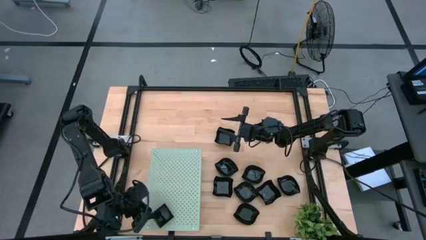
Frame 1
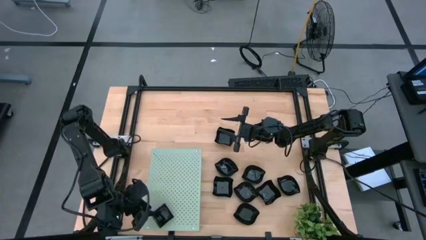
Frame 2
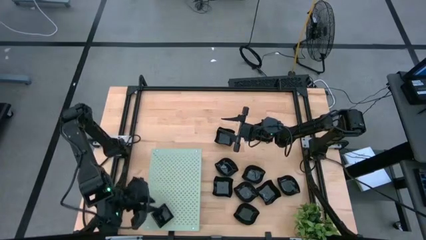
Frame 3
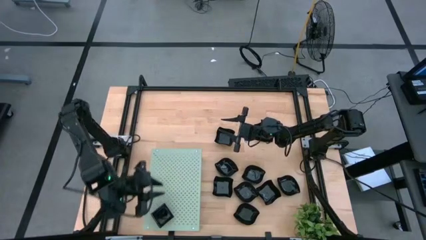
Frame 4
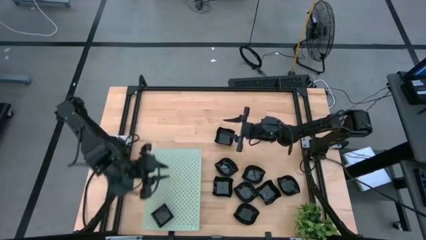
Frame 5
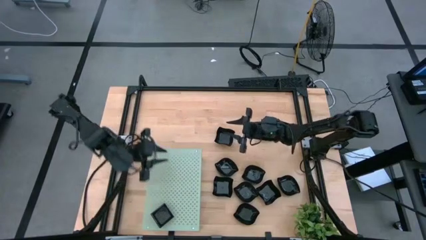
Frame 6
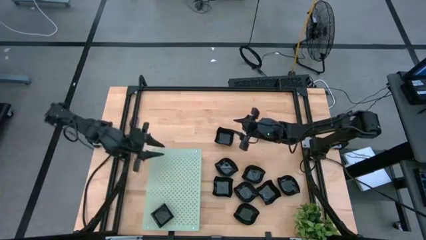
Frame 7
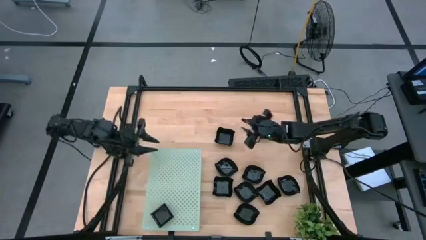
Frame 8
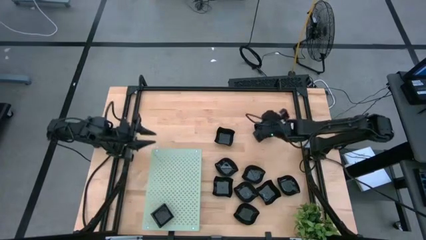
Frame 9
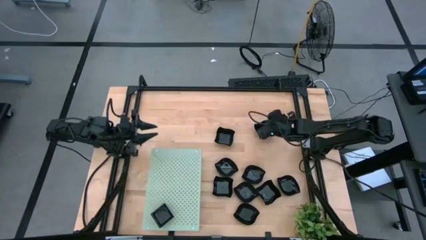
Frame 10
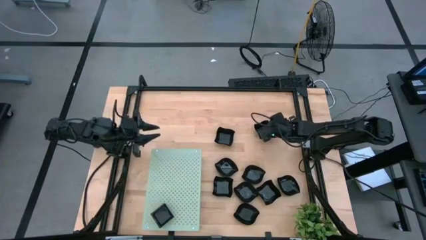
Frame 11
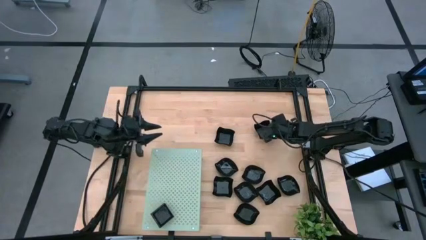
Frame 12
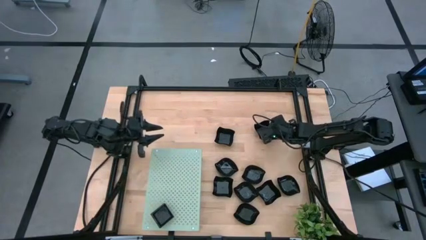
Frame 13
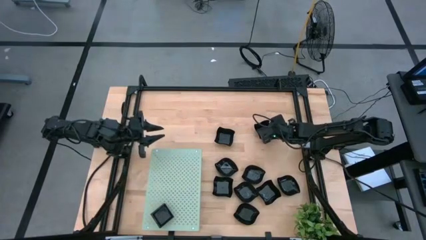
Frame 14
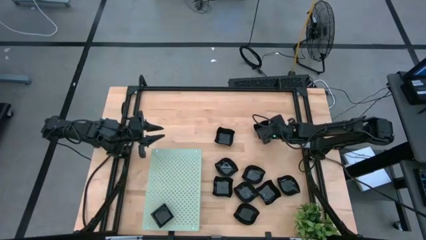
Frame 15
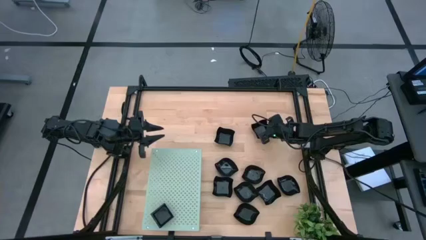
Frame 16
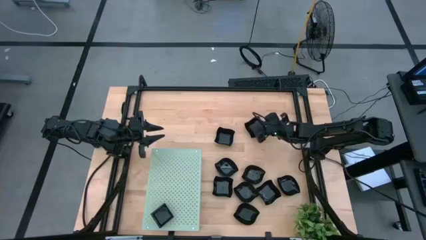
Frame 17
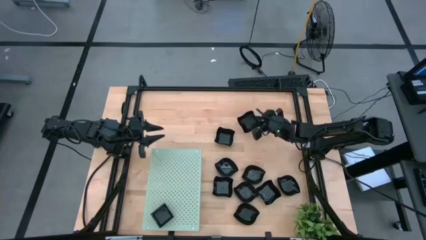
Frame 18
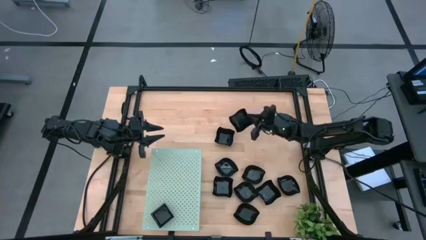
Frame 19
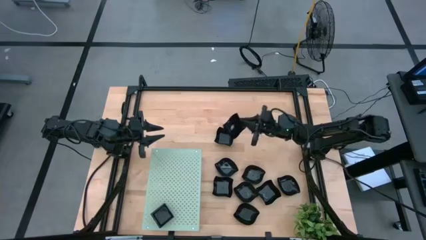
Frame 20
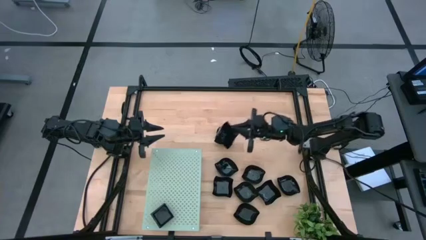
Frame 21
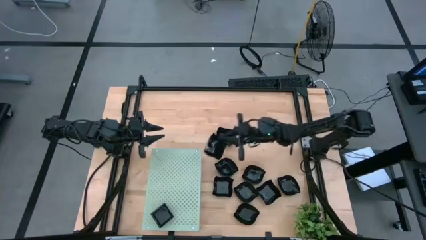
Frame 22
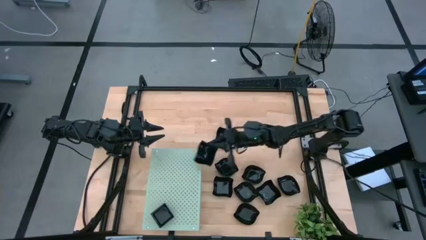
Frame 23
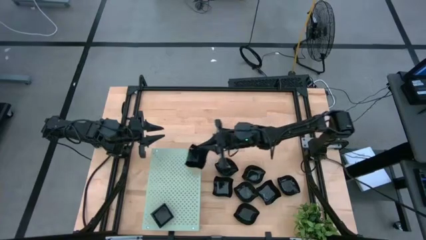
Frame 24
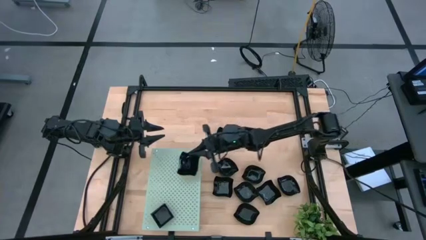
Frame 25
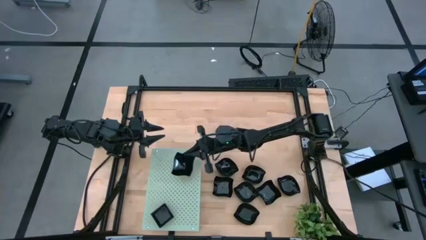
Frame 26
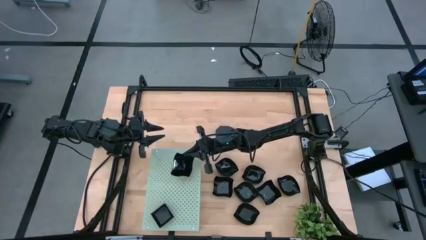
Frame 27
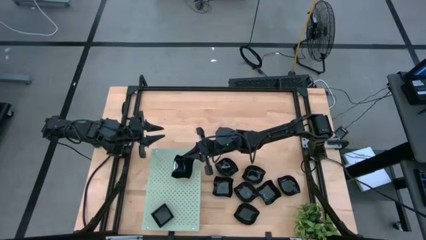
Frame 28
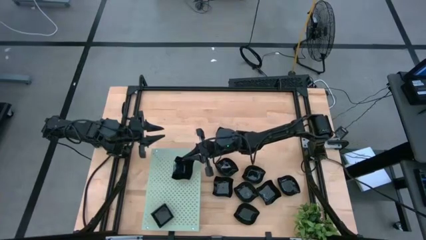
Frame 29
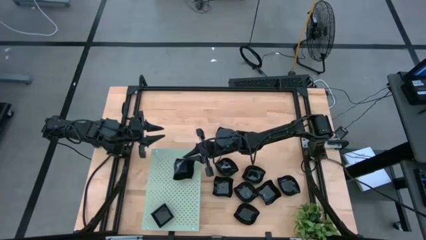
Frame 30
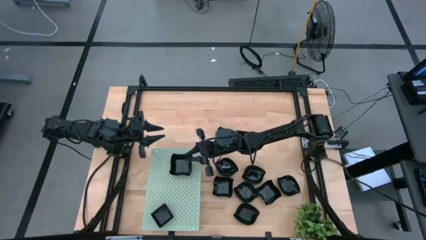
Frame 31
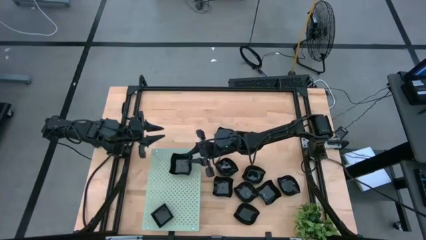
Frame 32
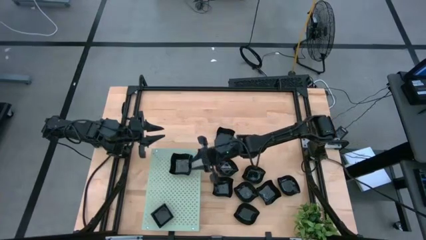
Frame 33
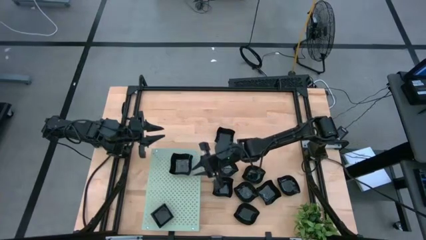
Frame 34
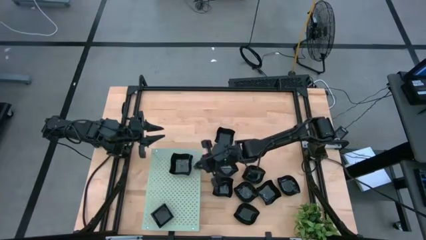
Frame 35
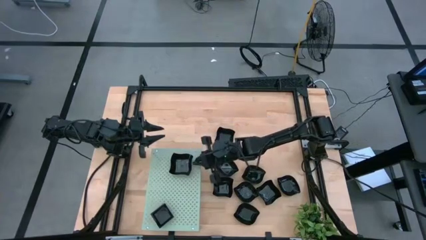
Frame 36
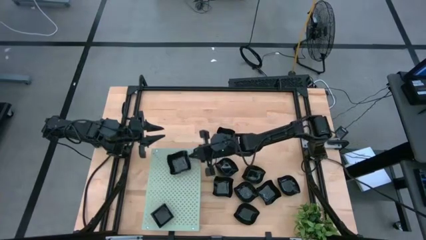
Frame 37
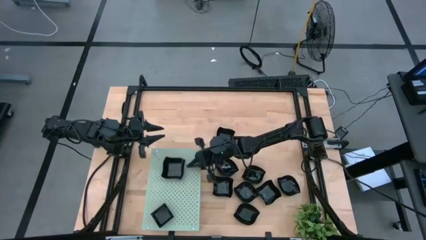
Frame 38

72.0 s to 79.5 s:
Task: Pick & Place Mini shaped plates
Put the distorted square plate on the shelf

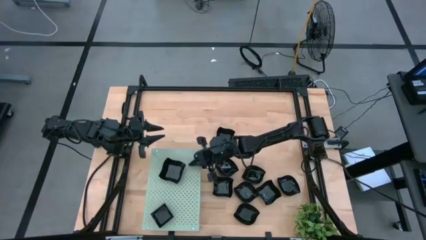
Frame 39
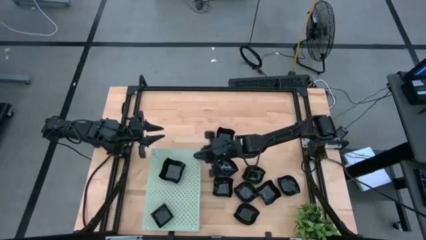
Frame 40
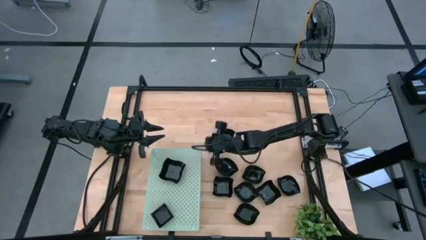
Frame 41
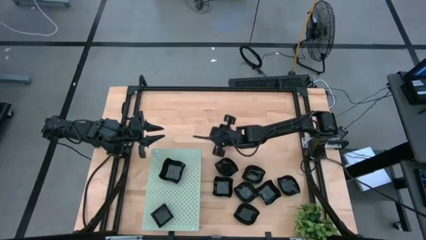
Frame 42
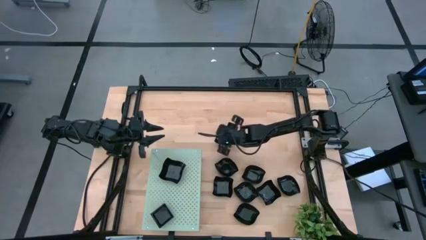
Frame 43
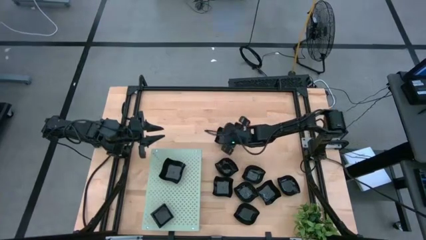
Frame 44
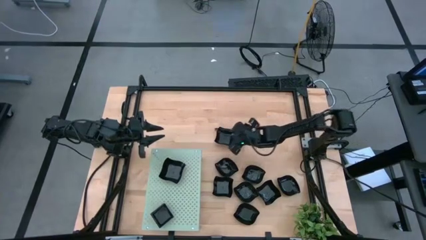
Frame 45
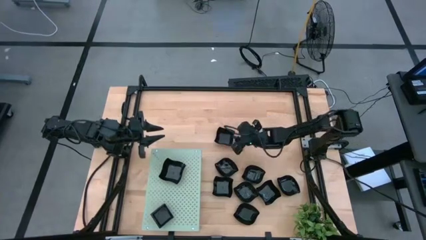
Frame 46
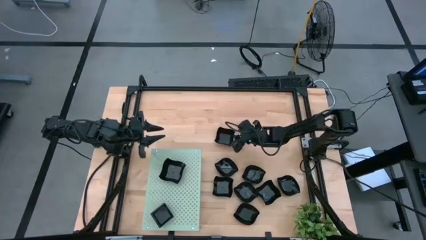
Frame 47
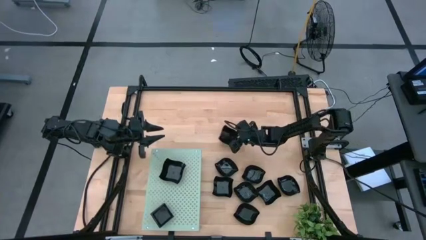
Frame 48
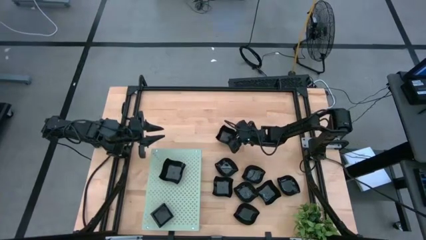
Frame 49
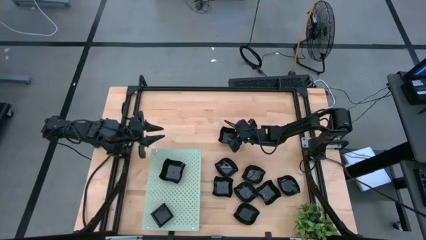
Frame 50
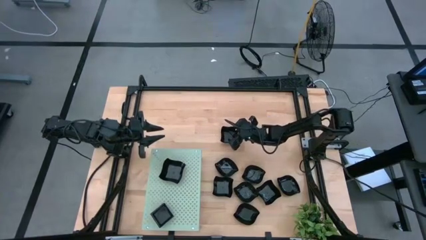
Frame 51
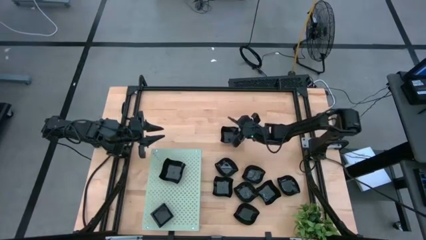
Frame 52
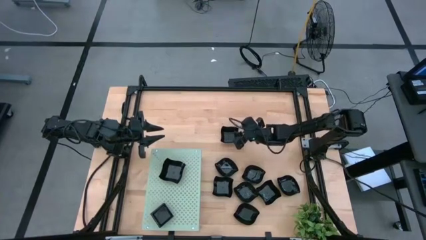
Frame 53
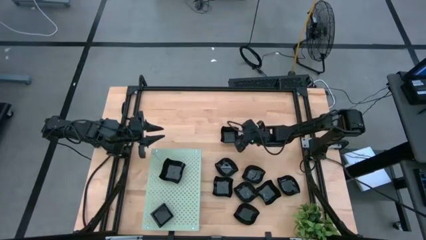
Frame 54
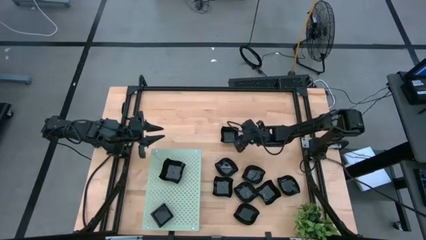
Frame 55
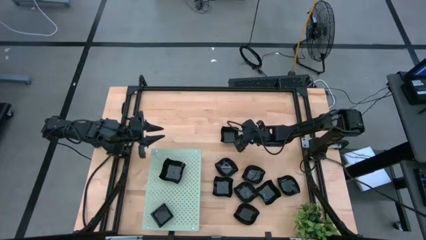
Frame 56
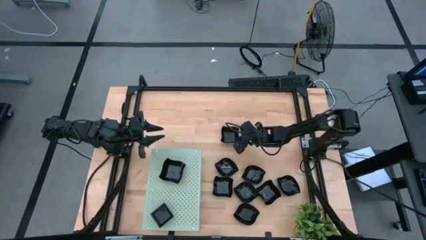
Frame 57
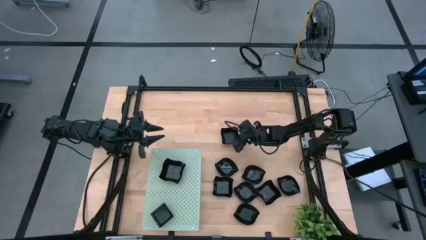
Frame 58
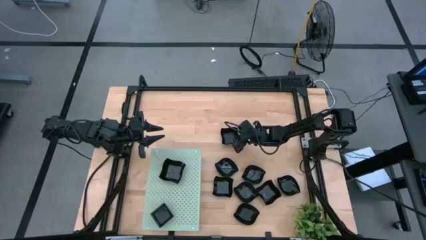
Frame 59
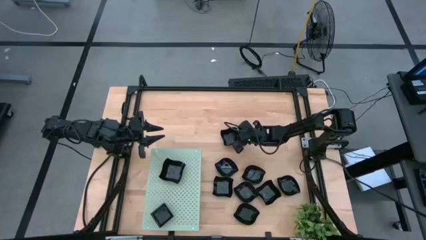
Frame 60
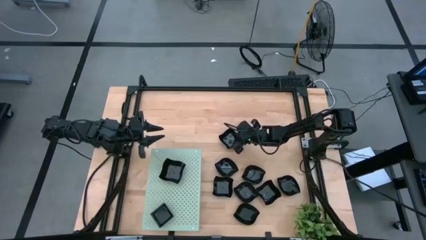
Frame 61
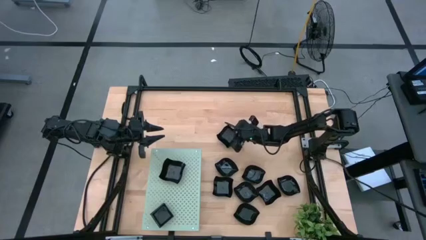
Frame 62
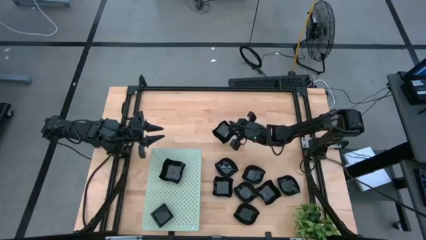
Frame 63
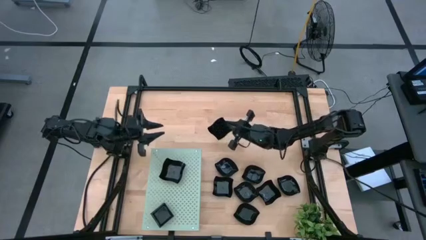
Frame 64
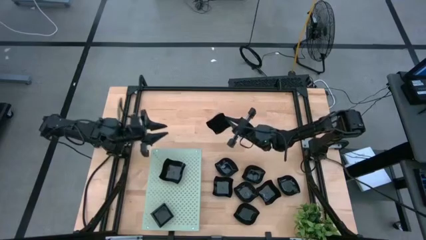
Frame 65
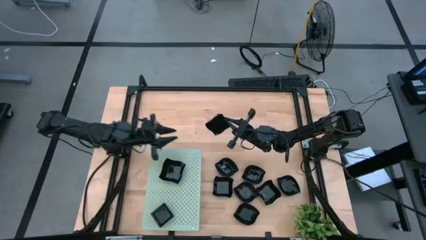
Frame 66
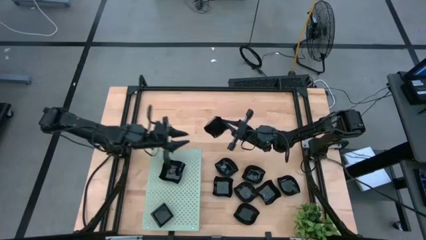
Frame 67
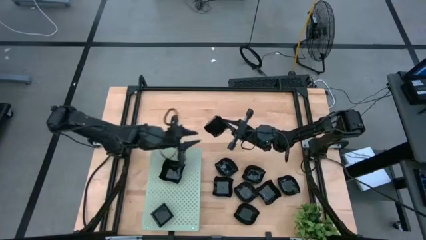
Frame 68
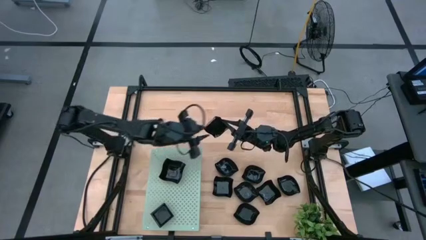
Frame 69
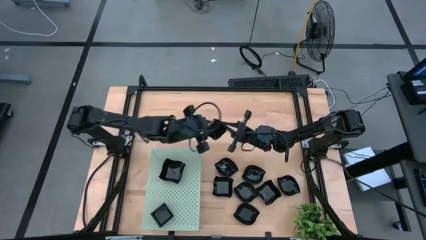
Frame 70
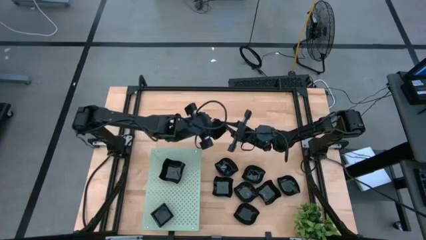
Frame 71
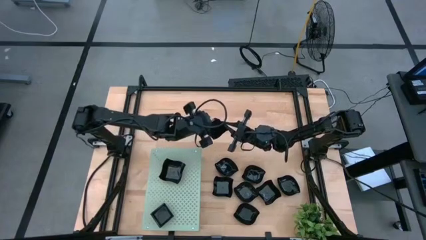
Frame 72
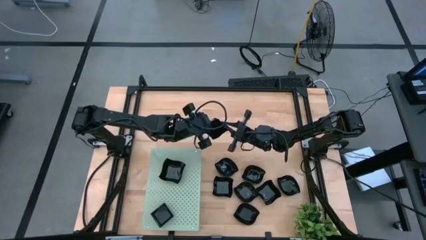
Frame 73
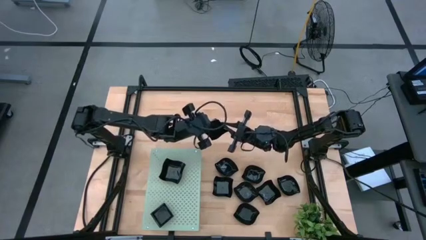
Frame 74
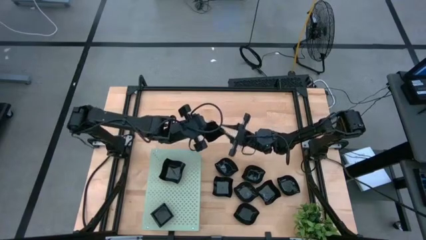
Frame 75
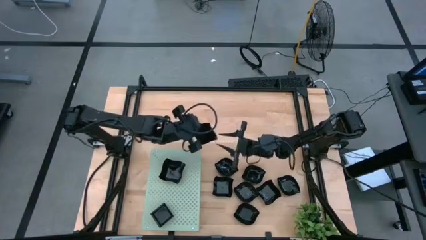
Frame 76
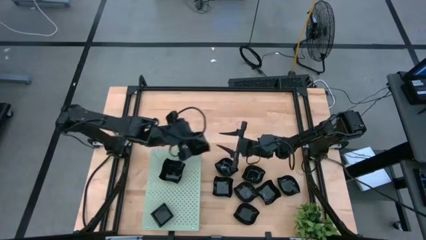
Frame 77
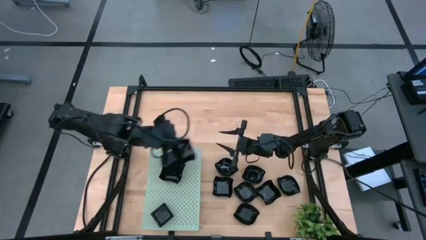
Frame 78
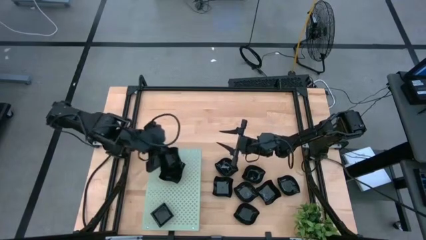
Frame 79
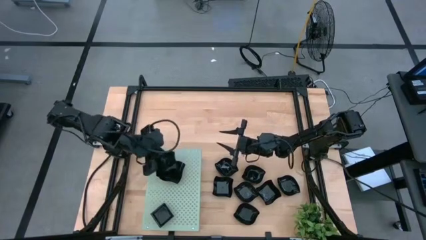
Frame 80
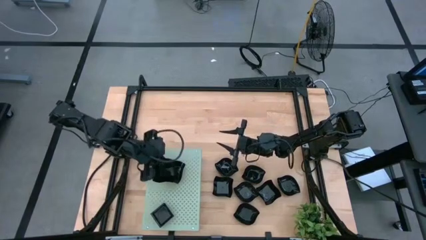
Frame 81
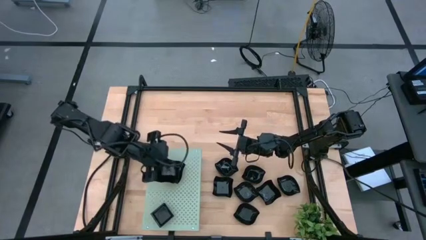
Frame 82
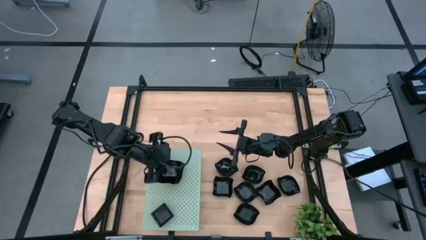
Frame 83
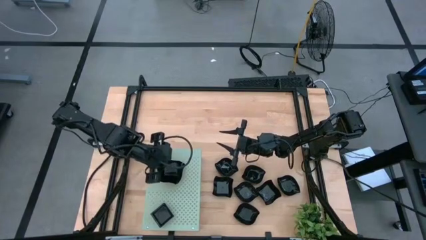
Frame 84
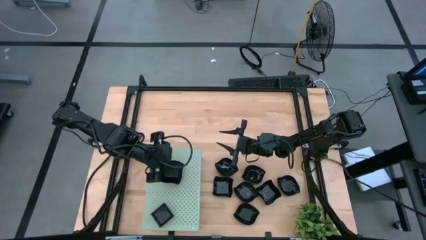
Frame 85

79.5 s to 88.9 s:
Stack the distorted square plate on top of the other distorted square plate on the shelf
